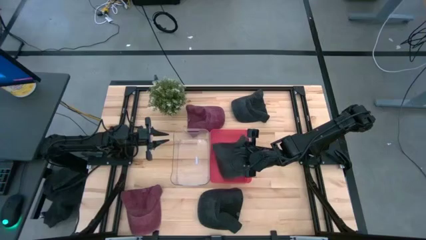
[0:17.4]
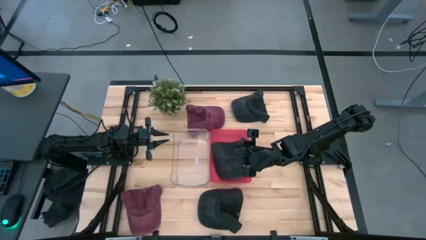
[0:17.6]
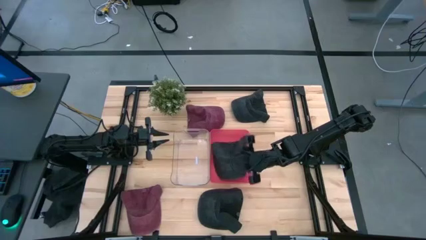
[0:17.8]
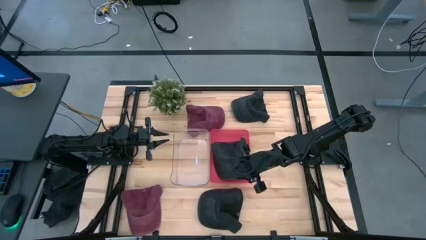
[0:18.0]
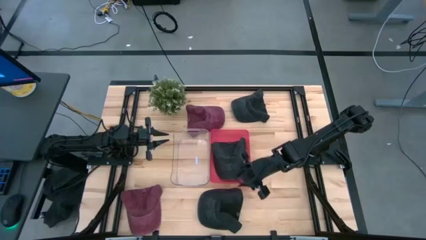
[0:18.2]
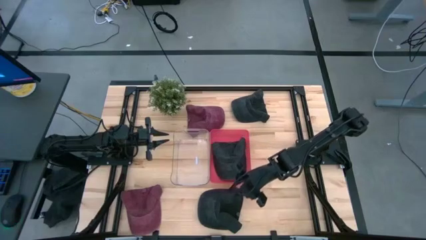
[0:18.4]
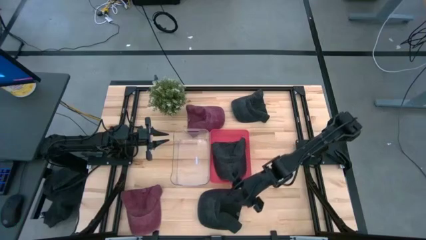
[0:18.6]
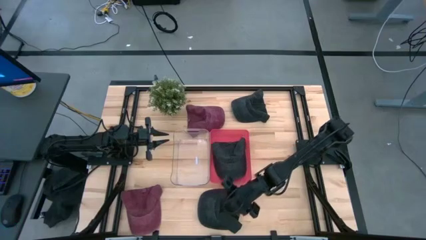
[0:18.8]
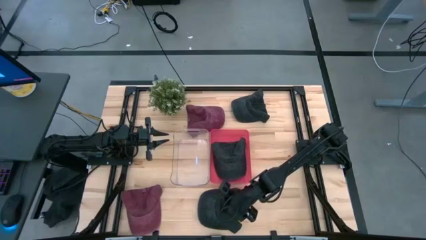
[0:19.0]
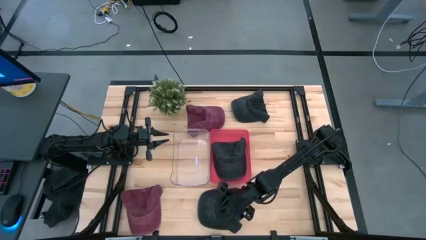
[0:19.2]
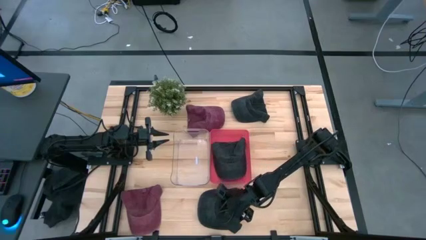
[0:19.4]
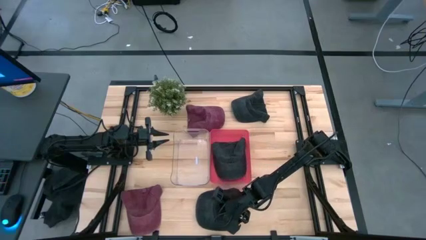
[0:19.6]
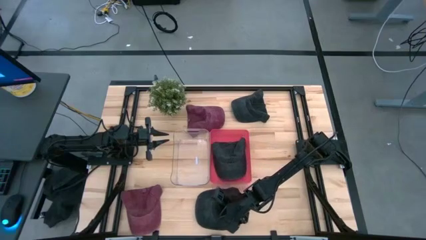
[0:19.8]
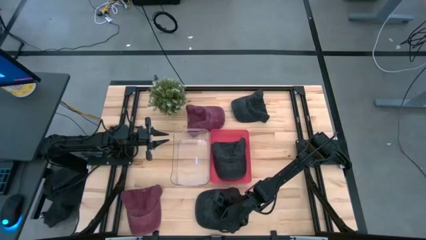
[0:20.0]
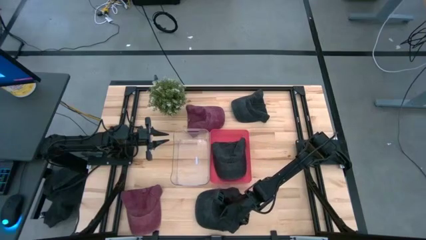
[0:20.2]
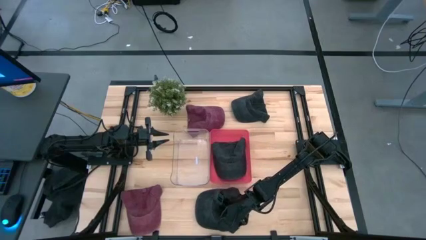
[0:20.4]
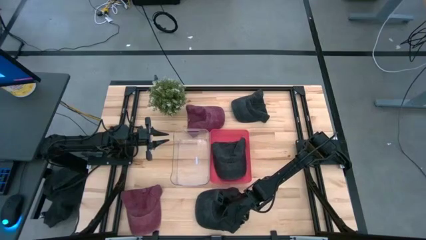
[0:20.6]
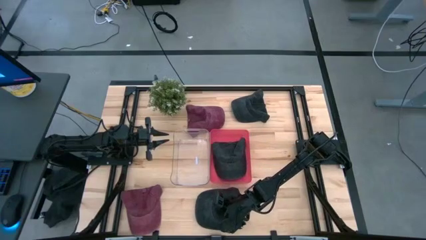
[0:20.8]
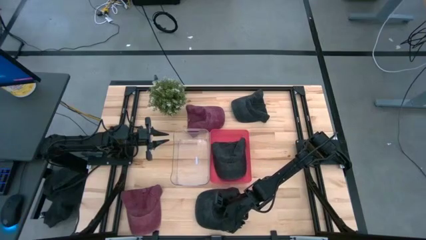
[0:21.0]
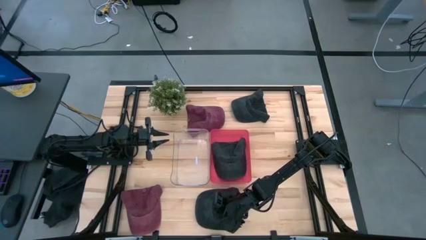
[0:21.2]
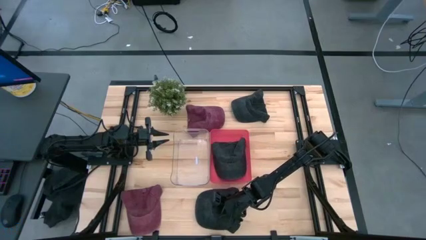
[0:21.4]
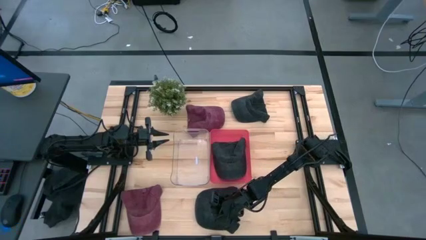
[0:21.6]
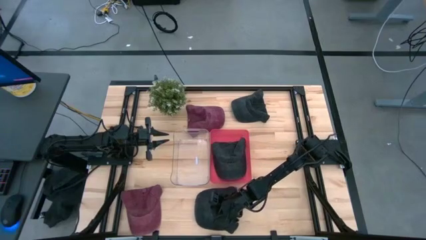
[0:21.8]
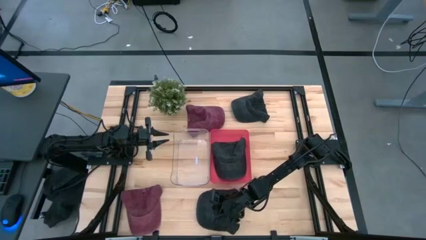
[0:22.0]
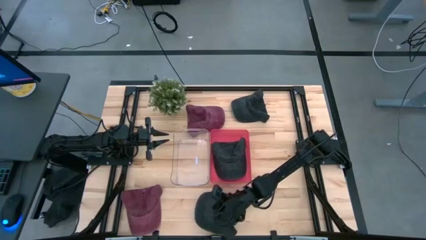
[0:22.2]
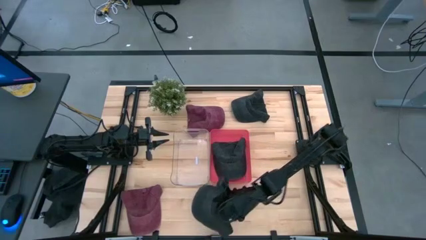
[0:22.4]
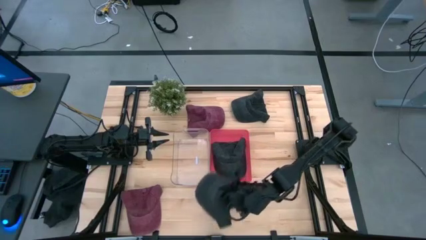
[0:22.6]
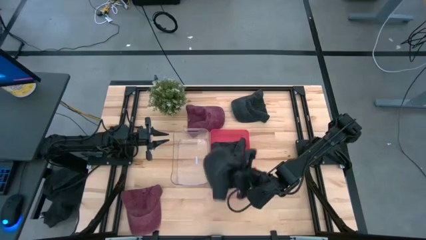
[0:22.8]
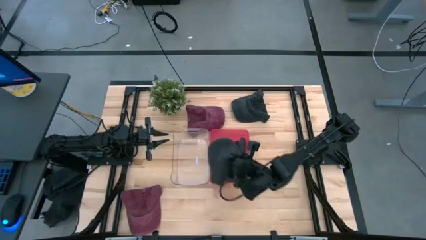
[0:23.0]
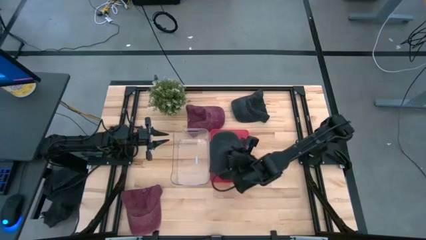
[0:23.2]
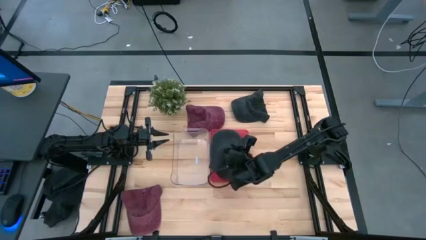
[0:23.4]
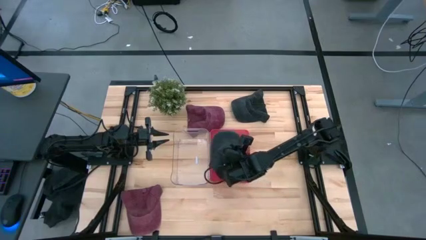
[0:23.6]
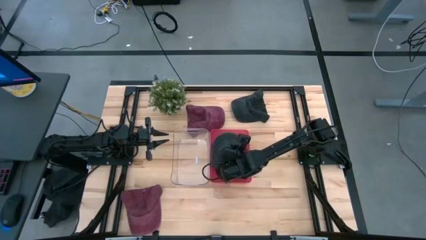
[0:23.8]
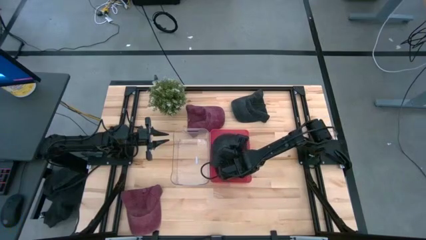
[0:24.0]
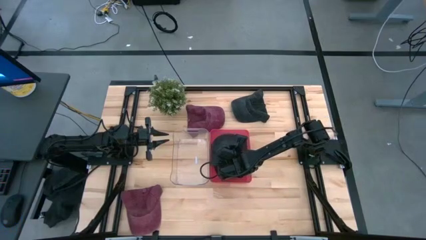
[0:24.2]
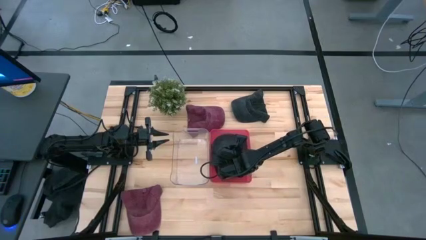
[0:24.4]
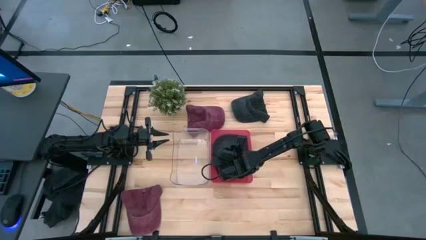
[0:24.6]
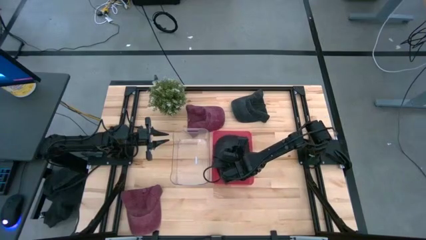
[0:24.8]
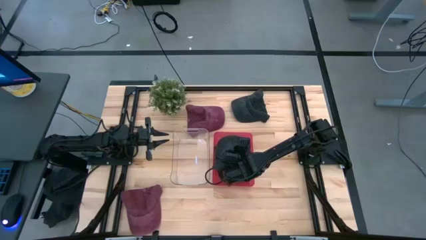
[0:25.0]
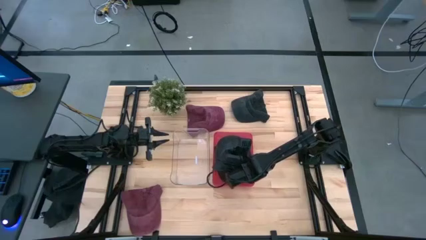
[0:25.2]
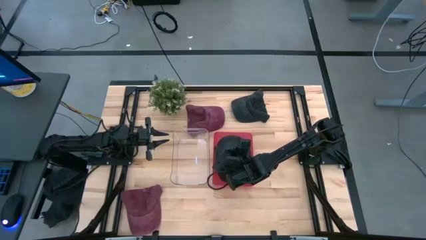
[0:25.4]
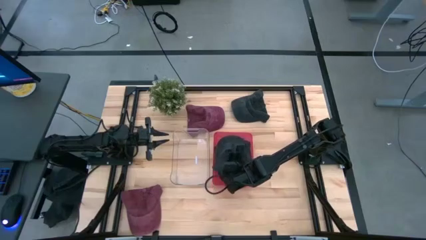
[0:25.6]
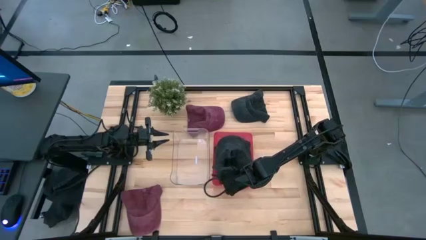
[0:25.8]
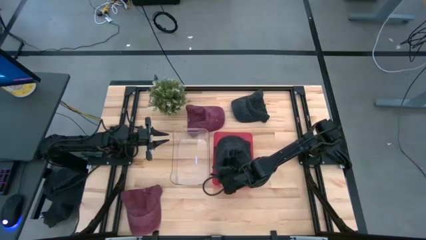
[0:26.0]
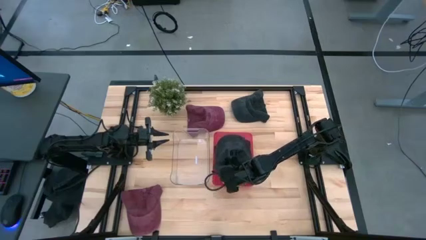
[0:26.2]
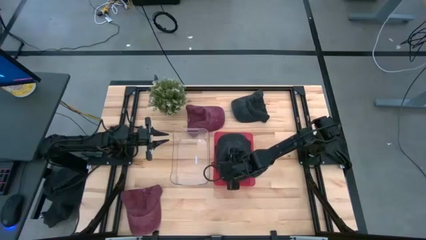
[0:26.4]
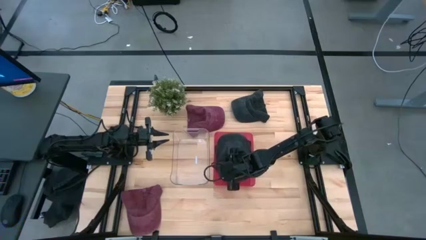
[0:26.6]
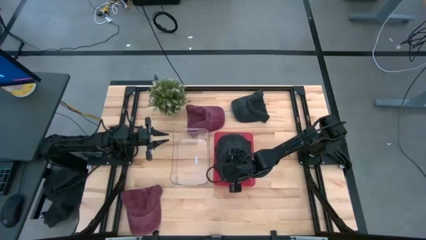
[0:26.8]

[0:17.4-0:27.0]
Task: Pick & Place hat
Put the bottom black cap into the red bin
